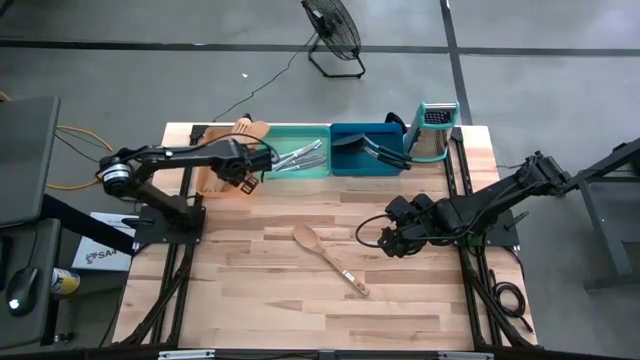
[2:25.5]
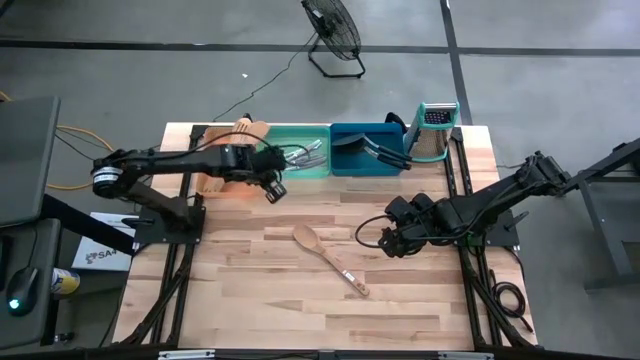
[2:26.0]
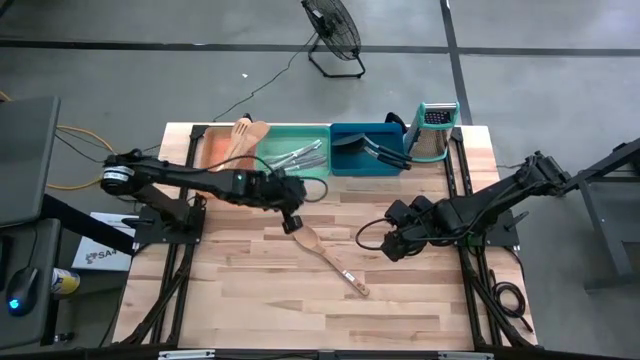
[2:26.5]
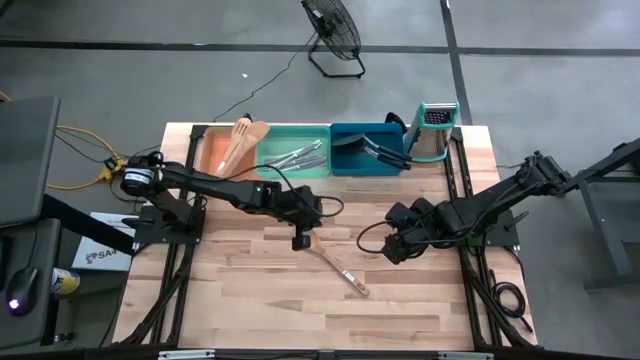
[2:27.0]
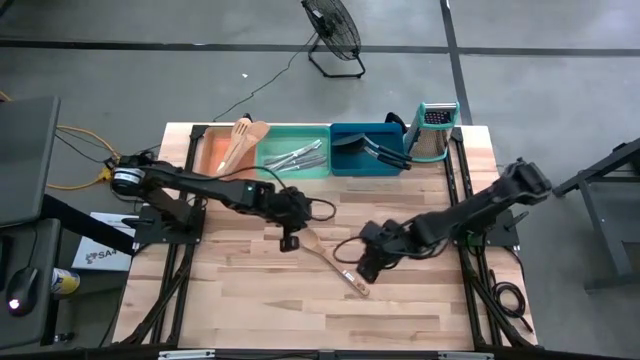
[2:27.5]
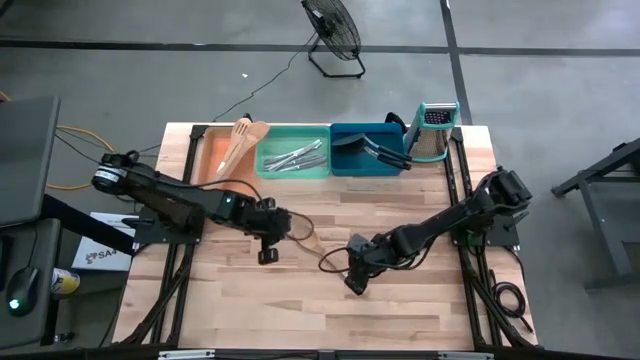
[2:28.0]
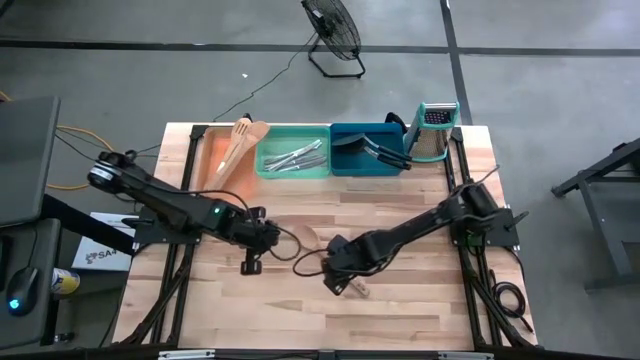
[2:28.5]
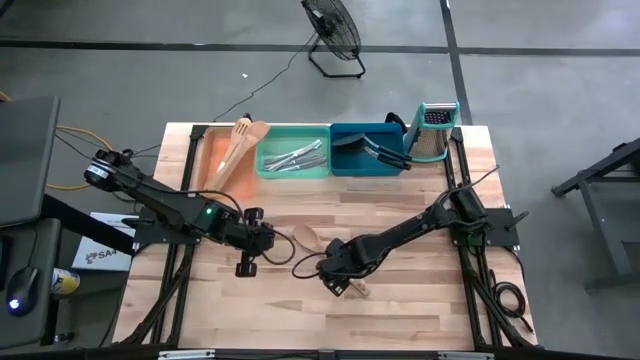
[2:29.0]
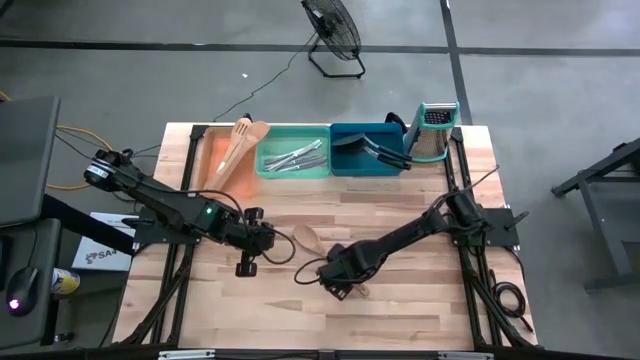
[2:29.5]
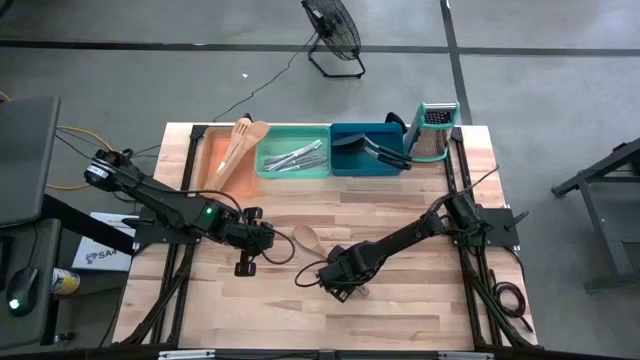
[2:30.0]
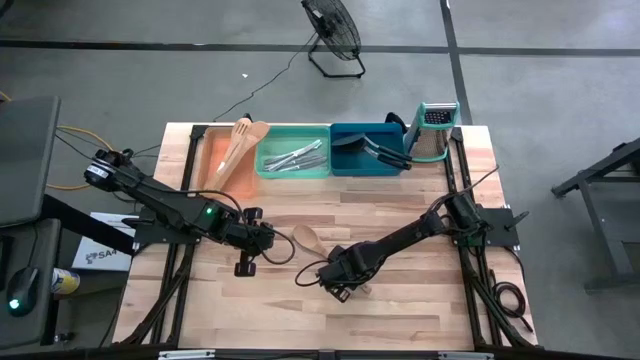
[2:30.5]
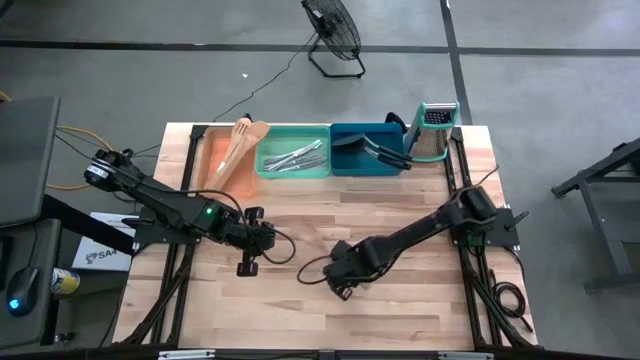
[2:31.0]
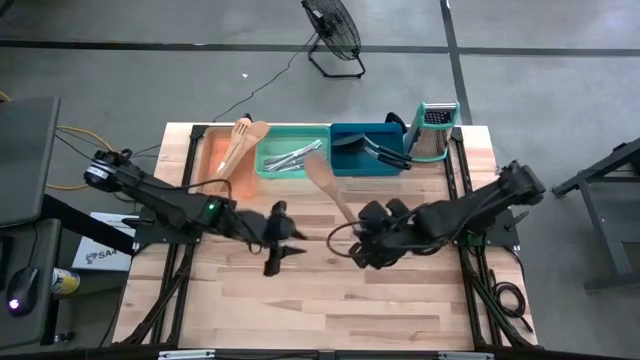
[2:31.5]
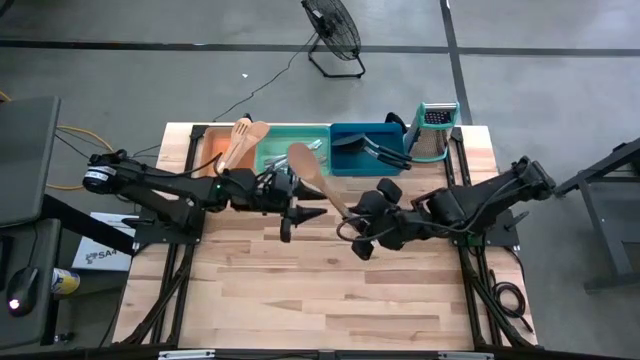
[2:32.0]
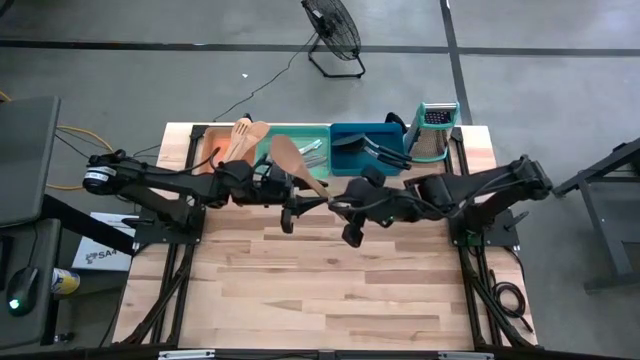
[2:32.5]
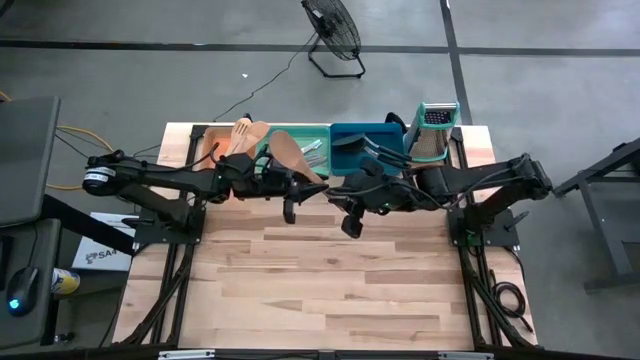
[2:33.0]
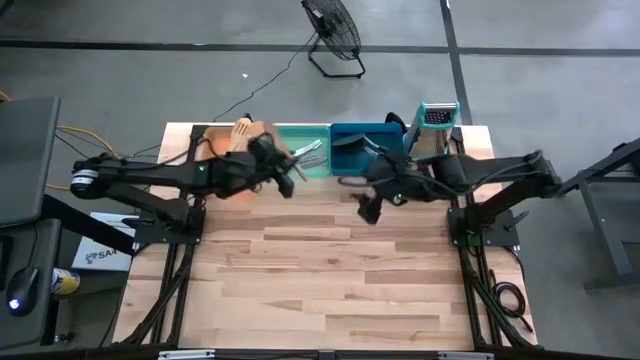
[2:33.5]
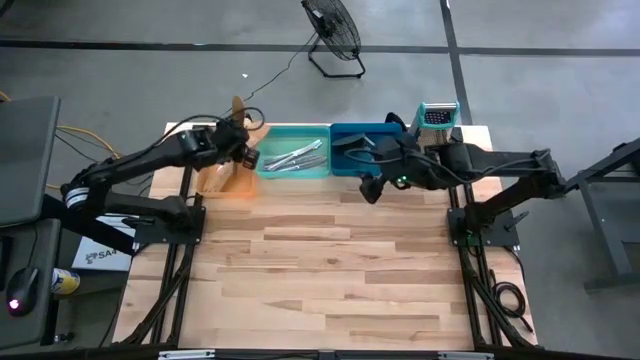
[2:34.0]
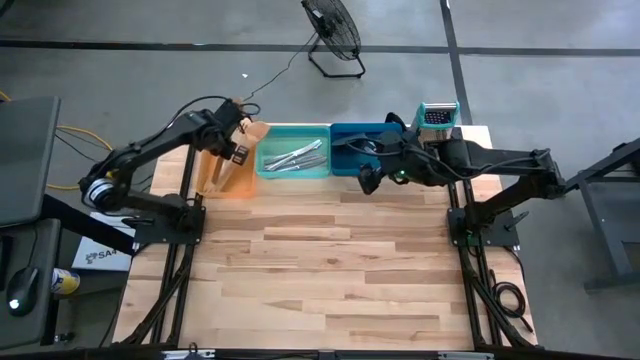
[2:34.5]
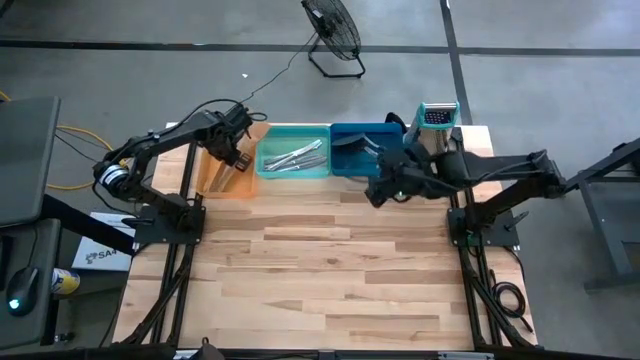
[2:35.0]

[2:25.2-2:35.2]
Task: Pick & Place Kitchen Items
Put the brown serving spoon into the orange bin

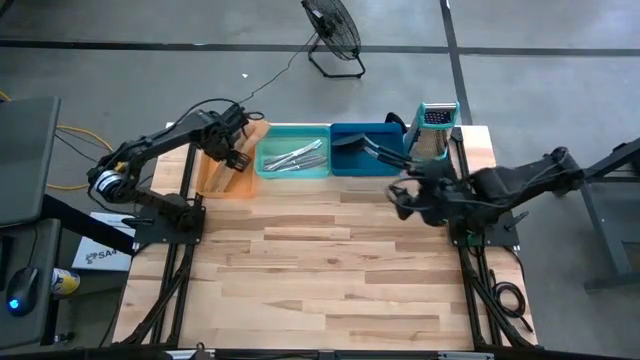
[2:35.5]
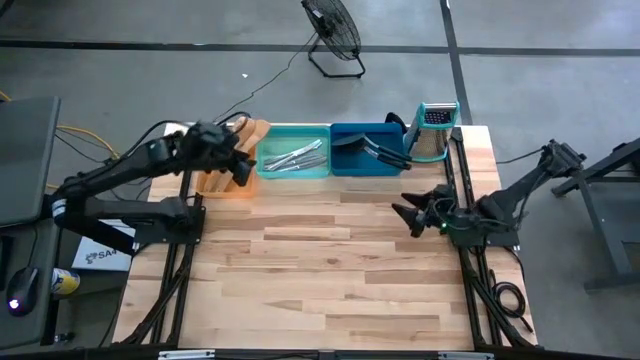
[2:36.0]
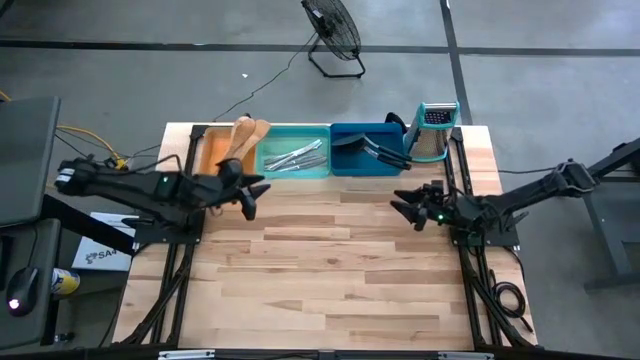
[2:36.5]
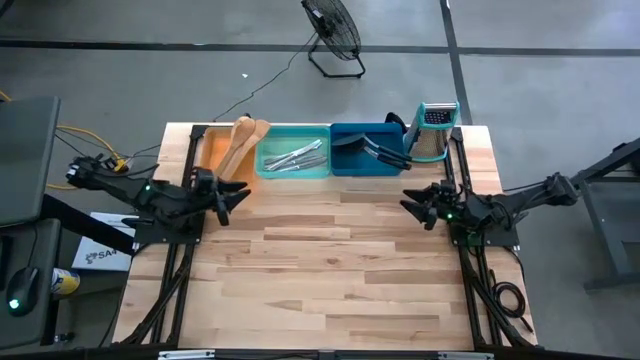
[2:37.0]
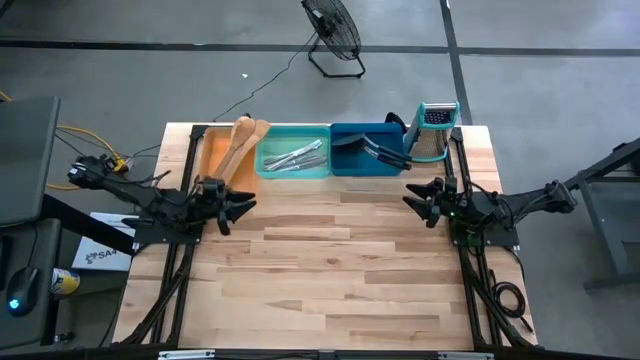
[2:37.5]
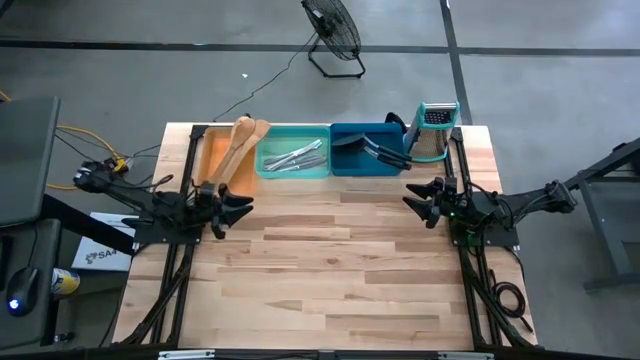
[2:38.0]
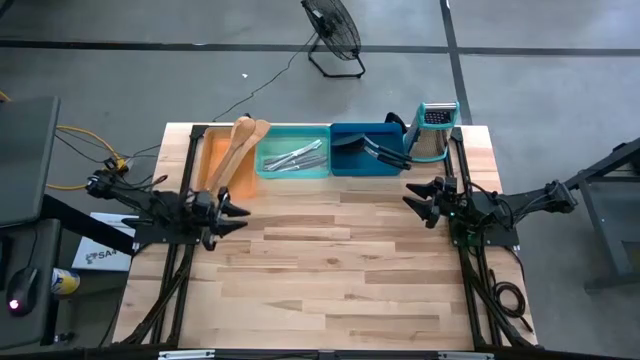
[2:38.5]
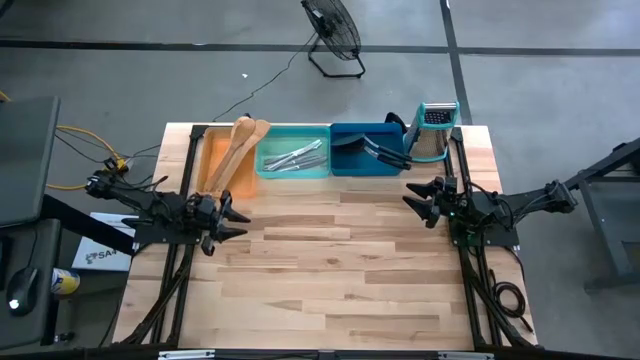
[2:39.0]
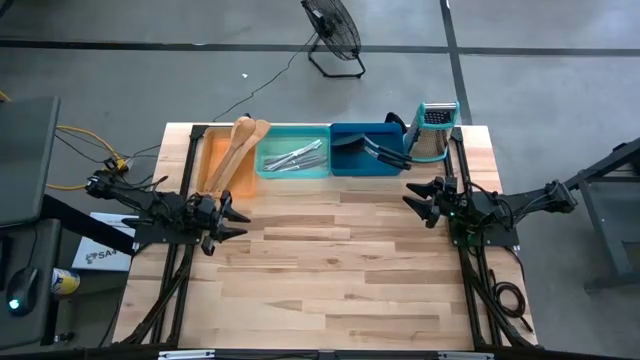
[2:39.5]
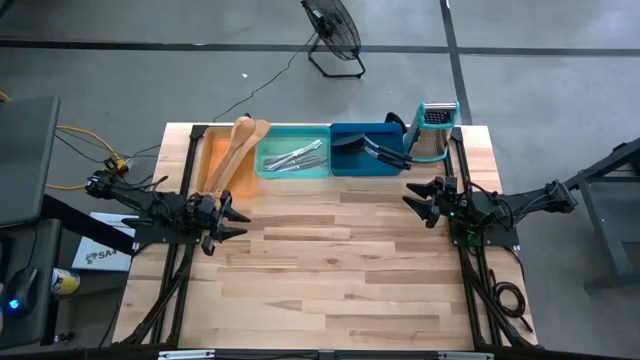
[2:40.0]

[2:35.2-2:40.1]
Return to Home Position

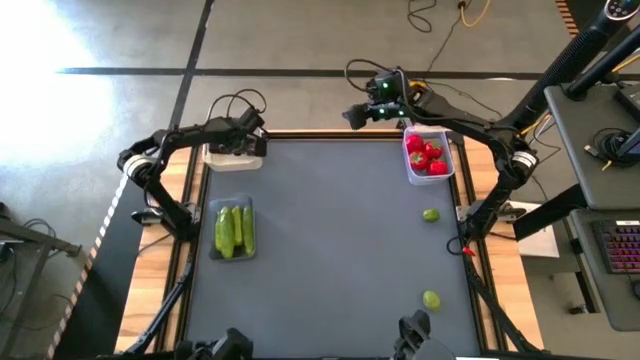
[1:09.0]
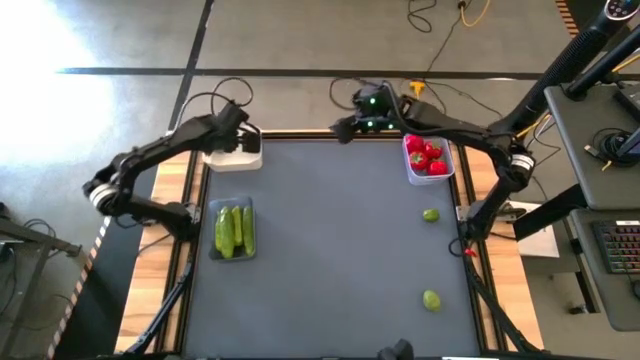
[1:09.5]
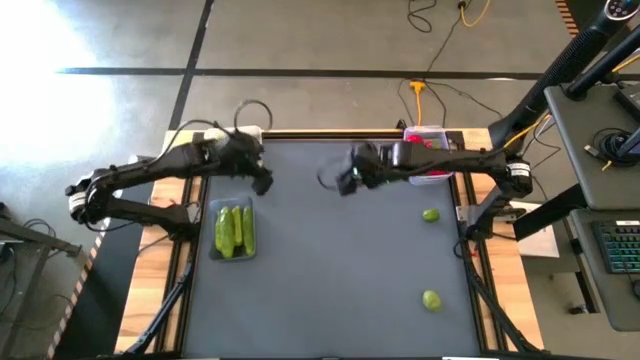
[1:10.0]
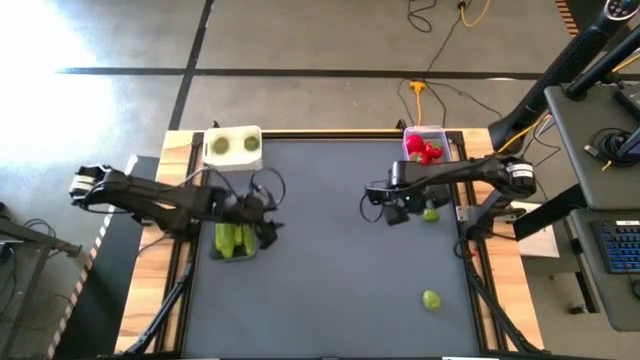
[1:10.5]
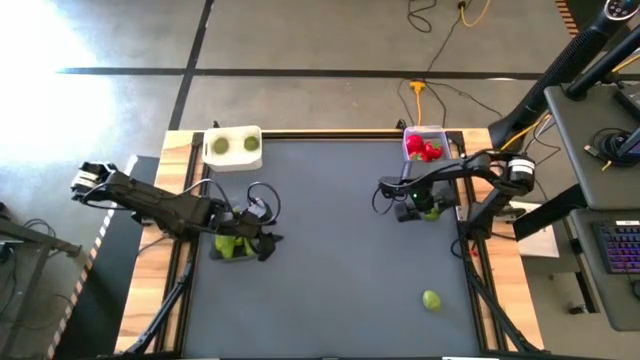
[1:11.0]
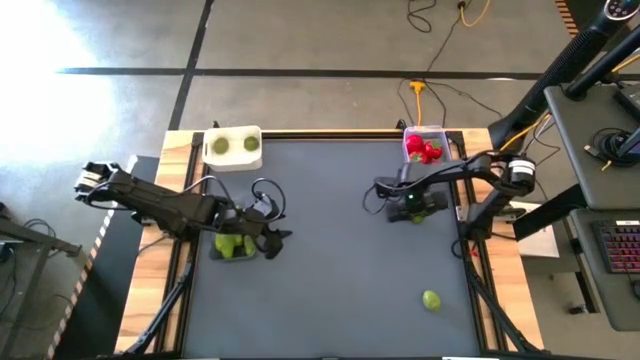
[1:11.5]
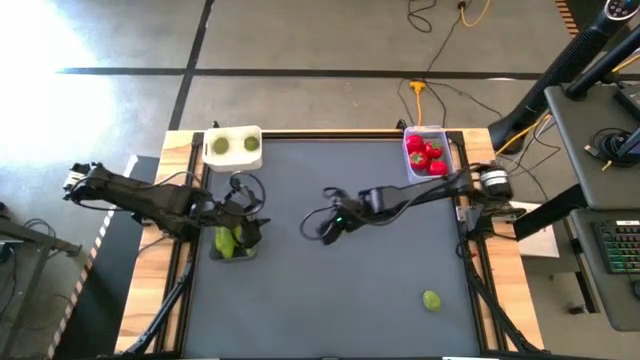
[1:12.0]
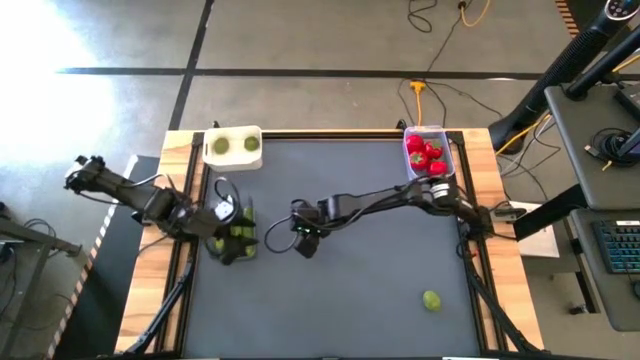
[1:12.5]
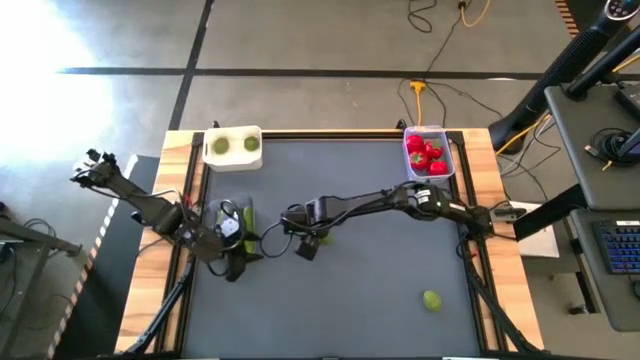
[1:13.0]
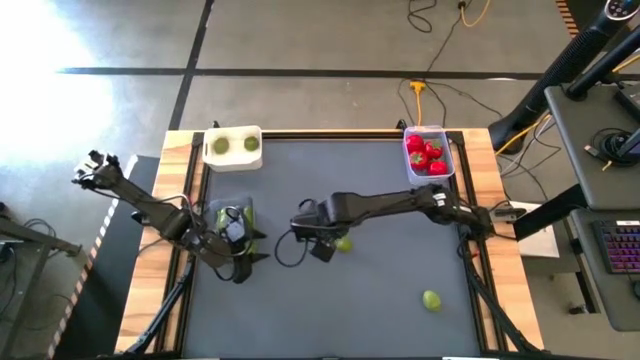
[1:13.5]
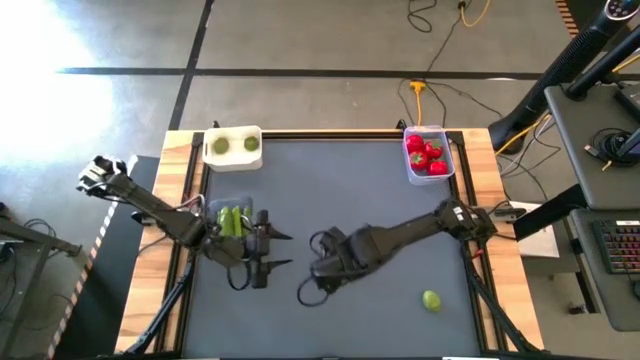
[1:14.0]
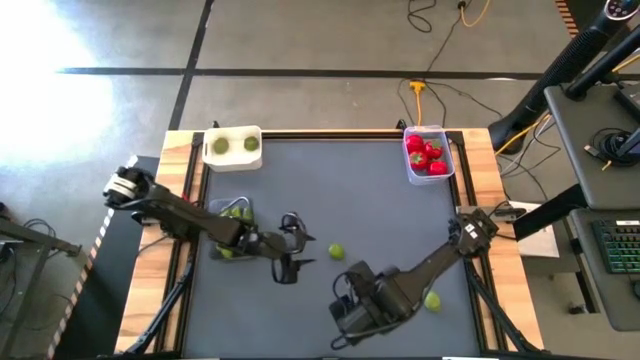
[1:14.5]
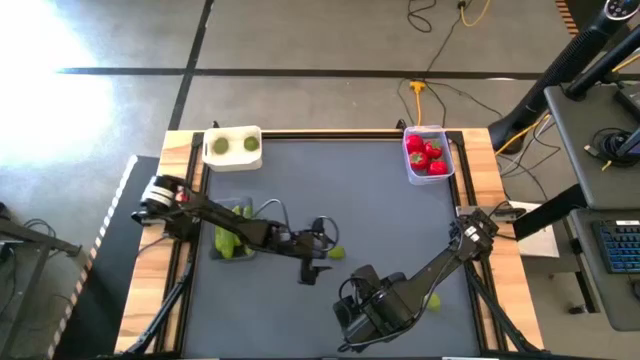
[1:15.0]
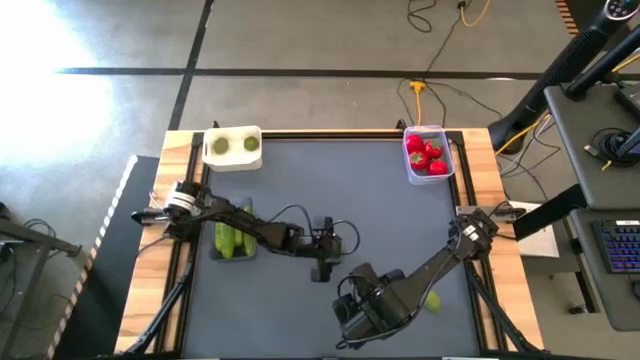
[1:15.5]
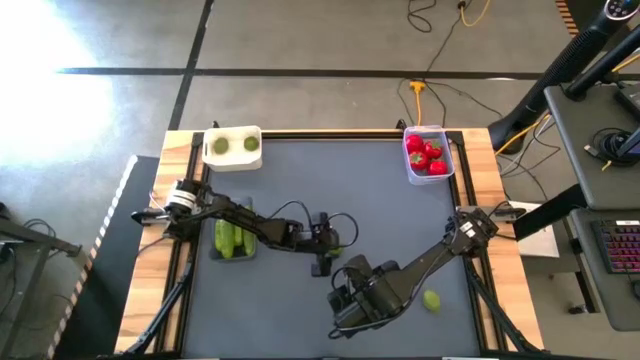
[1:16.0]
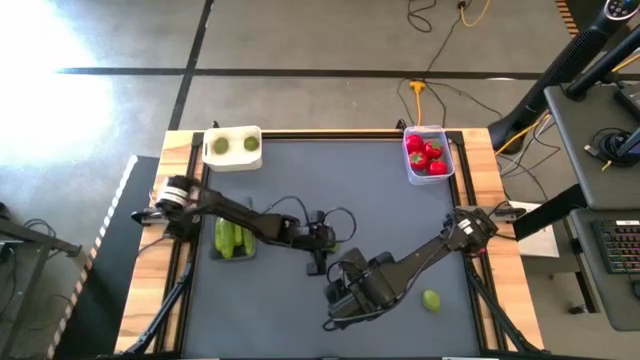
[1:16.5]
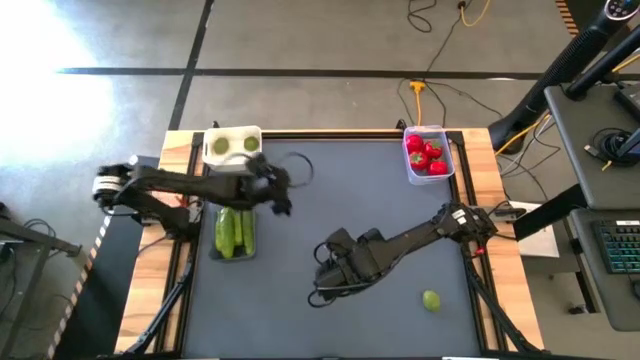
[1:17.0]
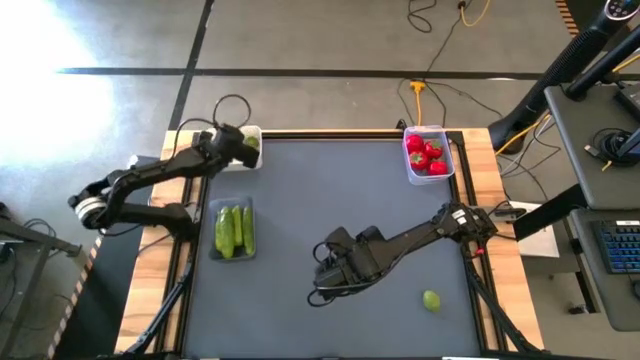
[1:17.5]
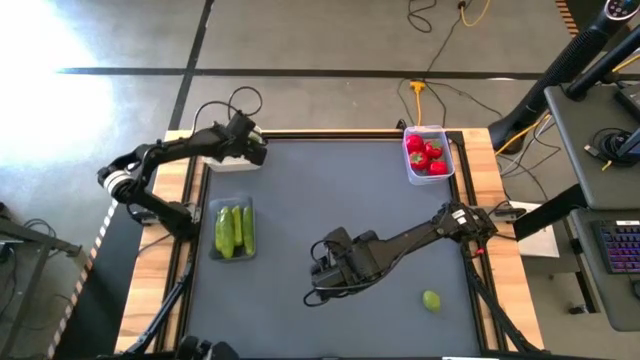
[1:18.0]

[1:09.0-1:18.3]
Task: Sort produce into baskets
Put the green lime into the white bin
